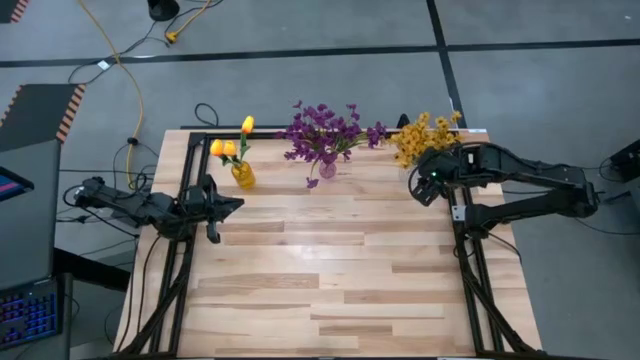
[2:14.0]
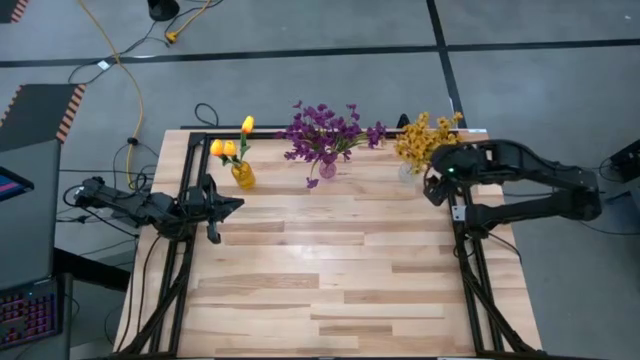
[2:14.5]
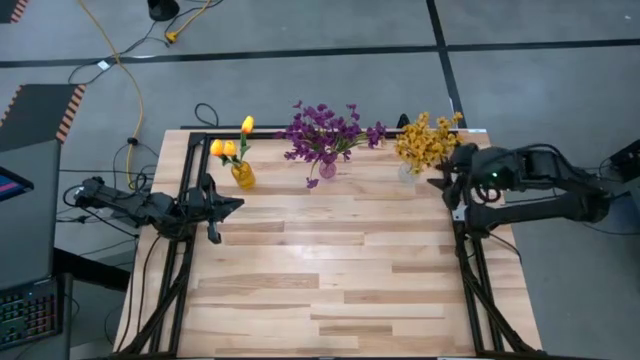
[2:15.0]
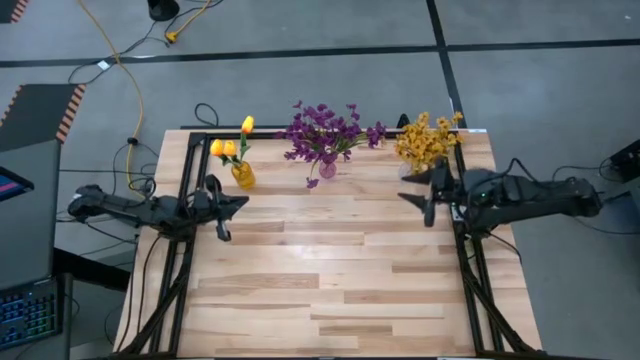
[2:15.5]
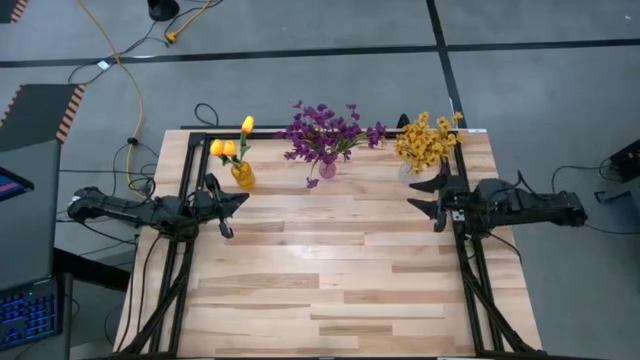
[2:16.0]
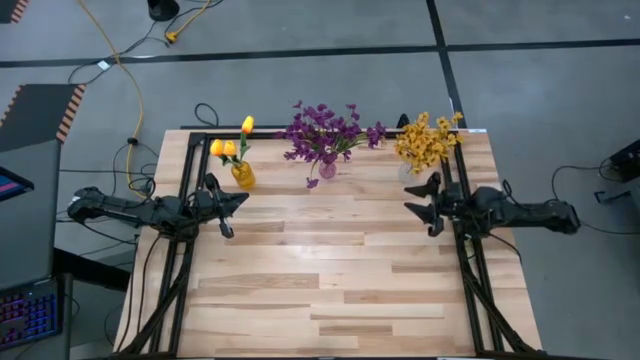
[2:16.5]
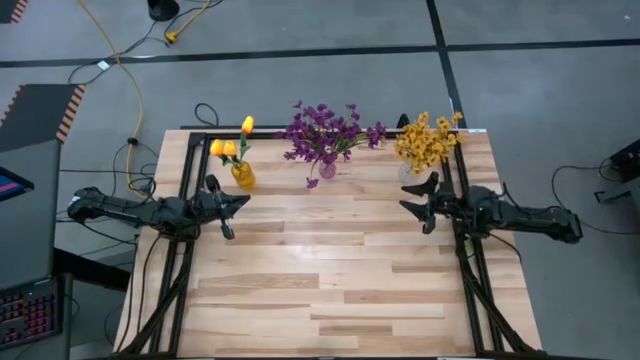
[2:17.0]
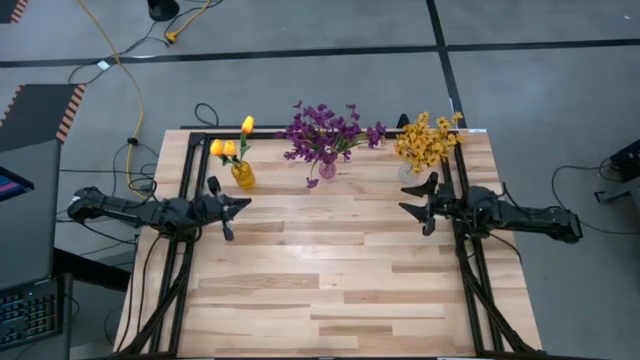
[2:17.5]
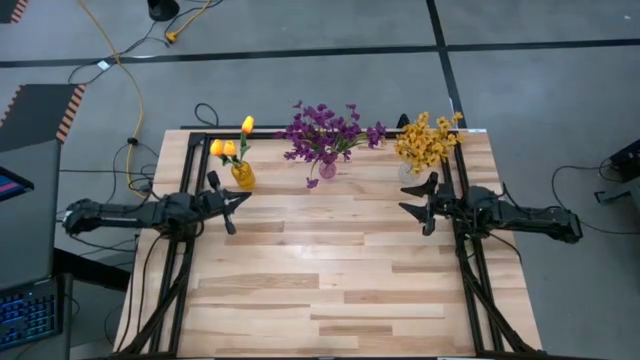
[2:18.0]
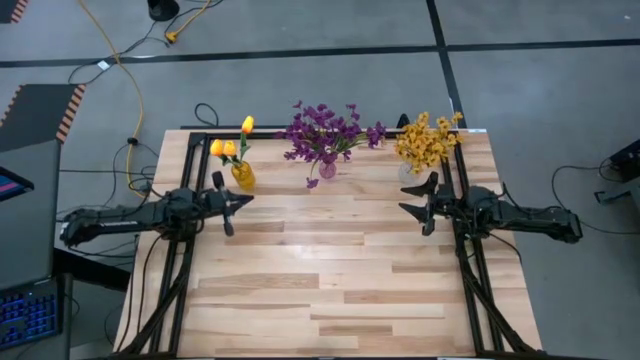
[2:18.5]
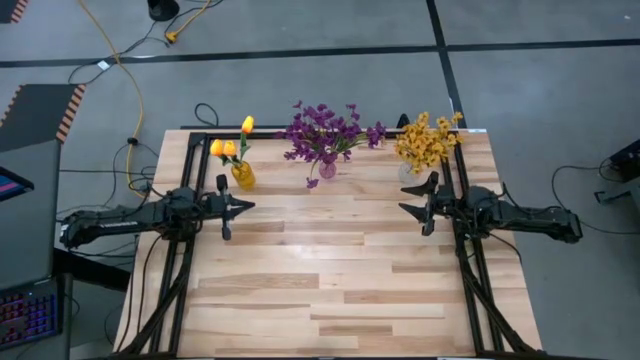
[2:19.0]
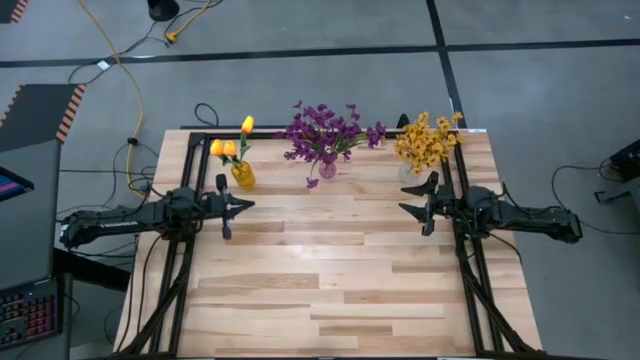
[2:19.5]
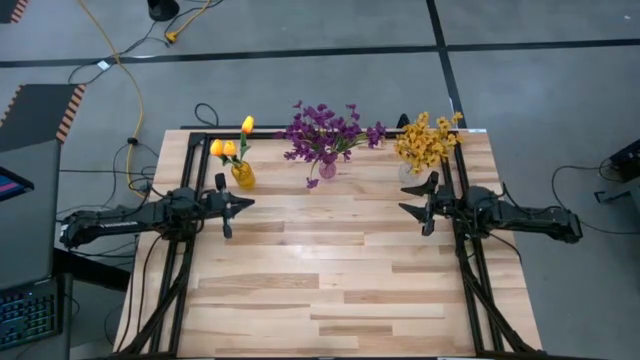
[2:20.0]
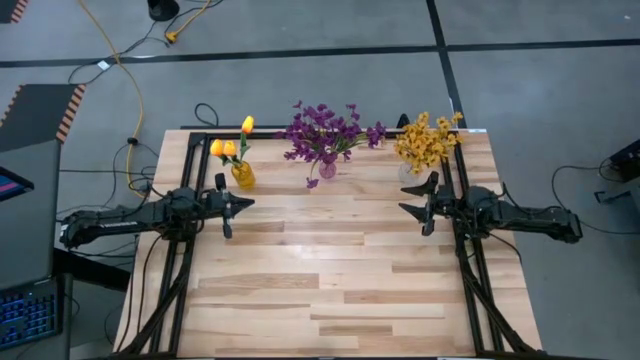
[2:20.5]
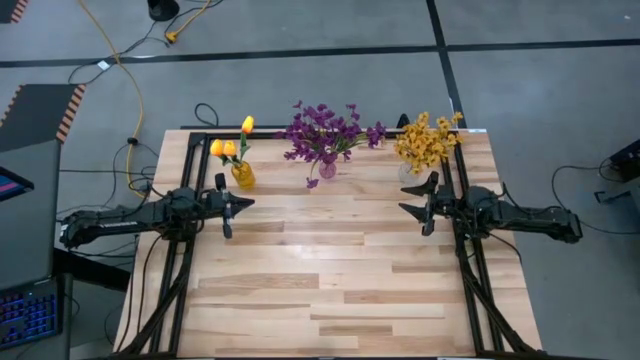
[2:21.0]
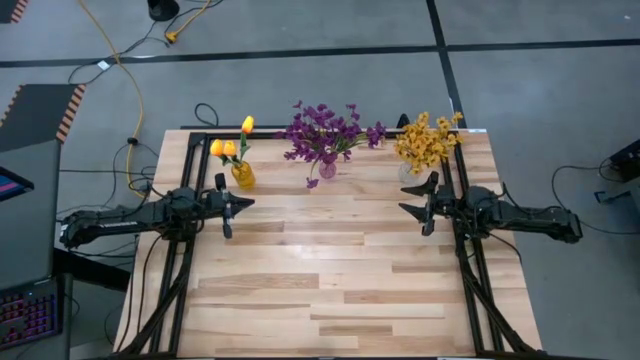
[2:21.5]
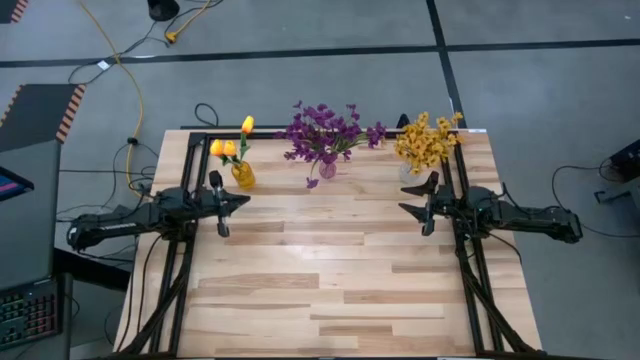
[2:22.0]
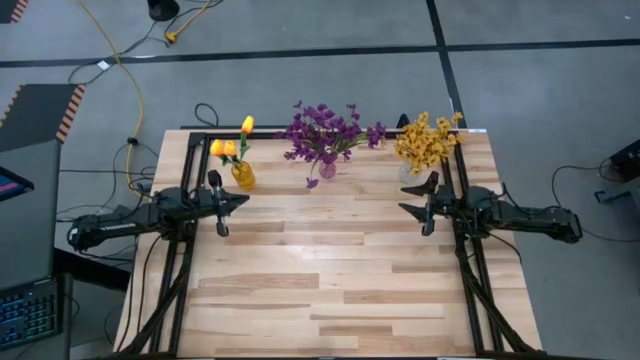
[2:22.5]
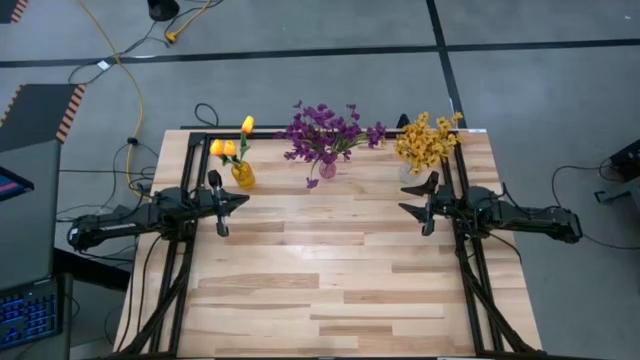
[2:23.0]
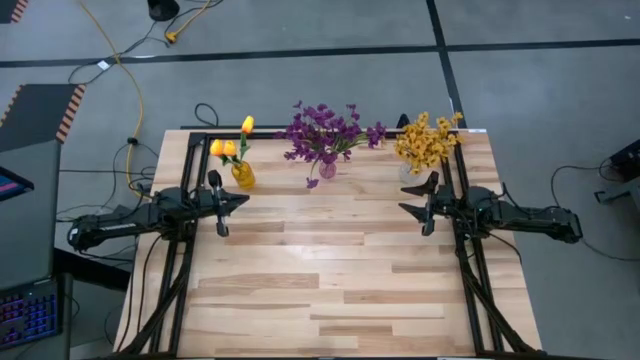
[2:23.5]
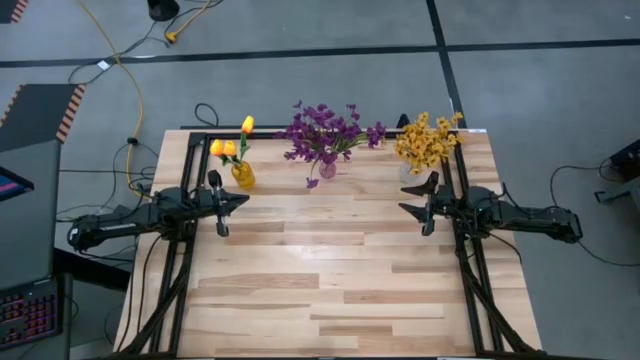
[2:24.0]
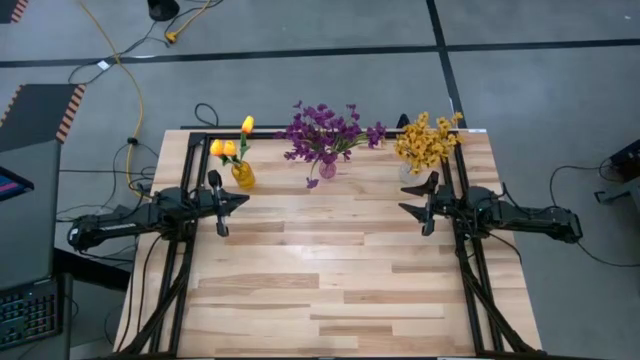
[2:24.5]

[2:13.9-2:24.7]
Task: Sort flowers into vase by color
Return to Home Position

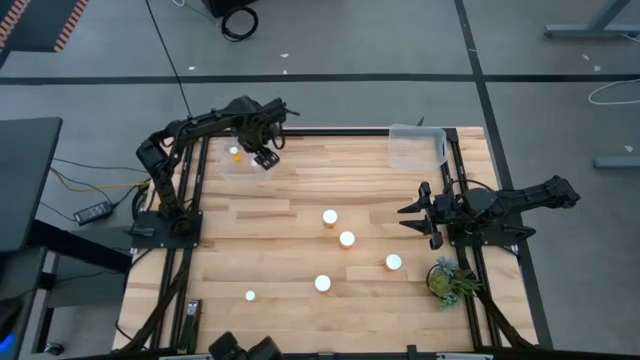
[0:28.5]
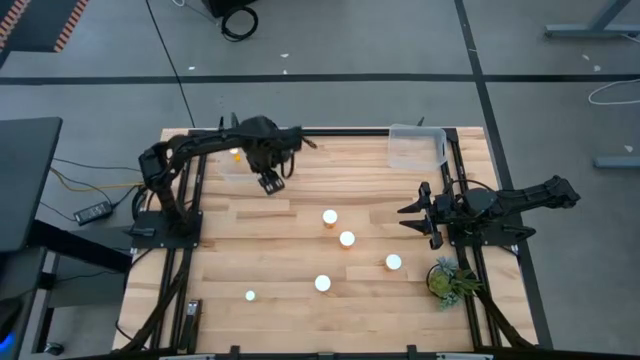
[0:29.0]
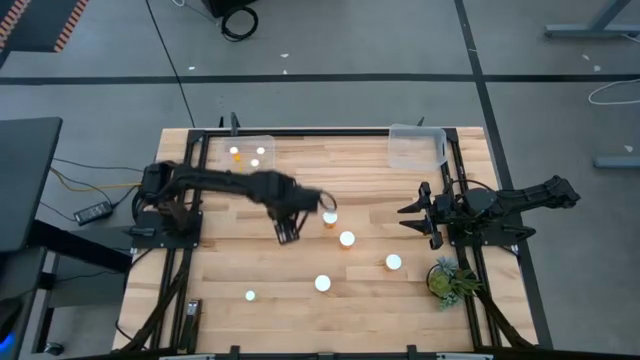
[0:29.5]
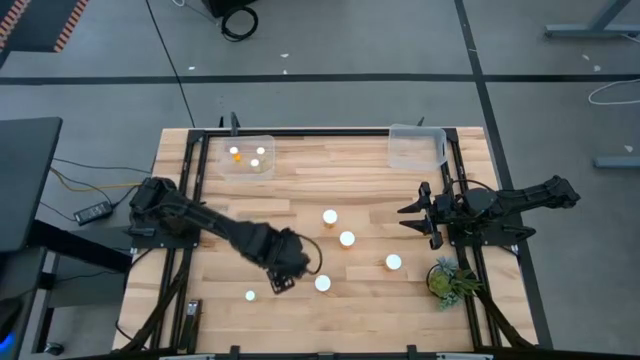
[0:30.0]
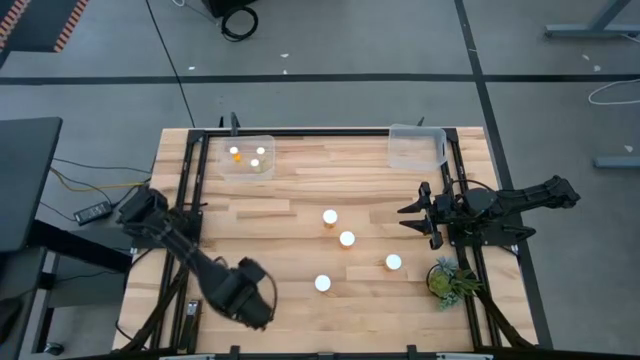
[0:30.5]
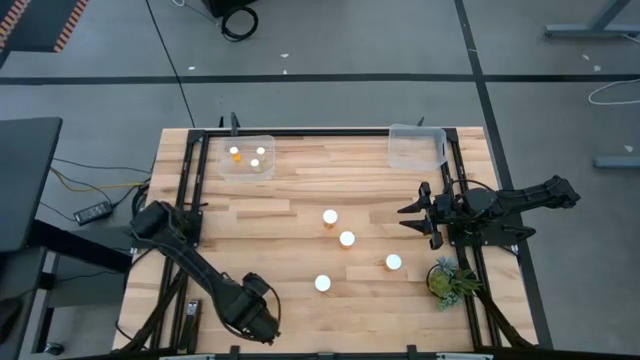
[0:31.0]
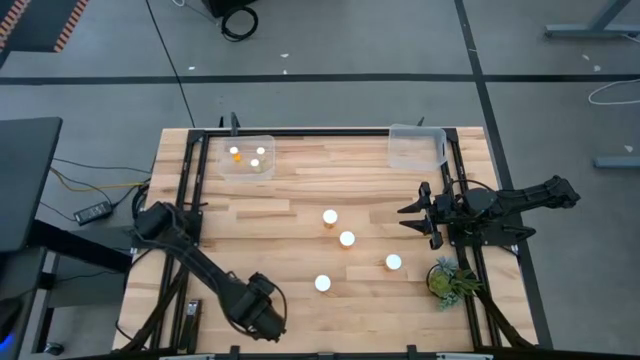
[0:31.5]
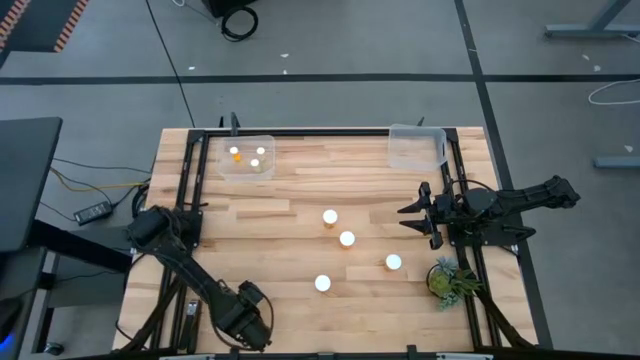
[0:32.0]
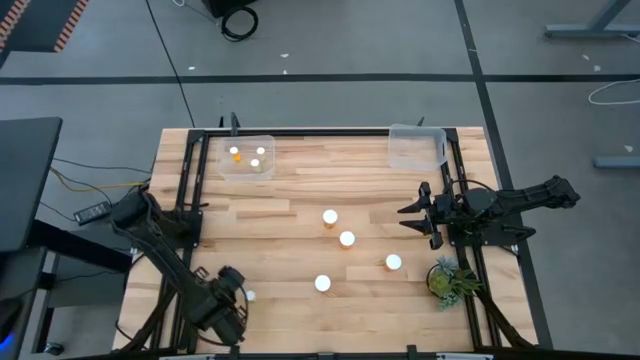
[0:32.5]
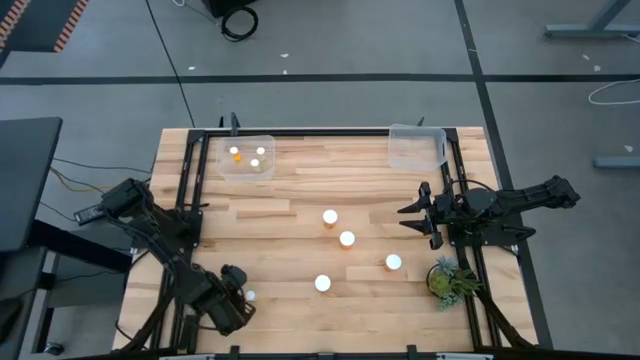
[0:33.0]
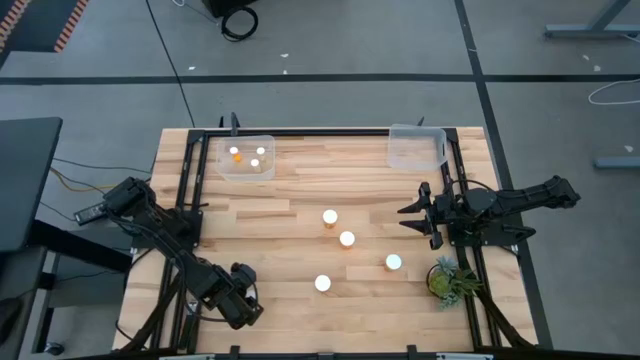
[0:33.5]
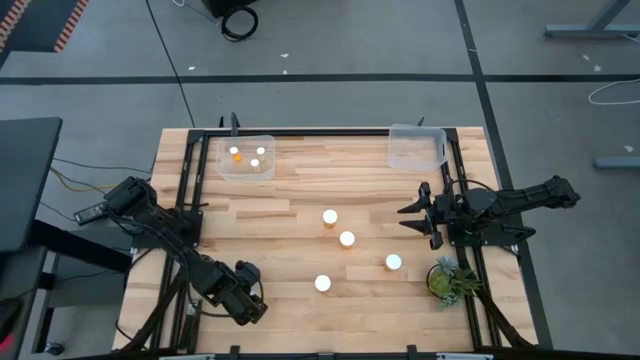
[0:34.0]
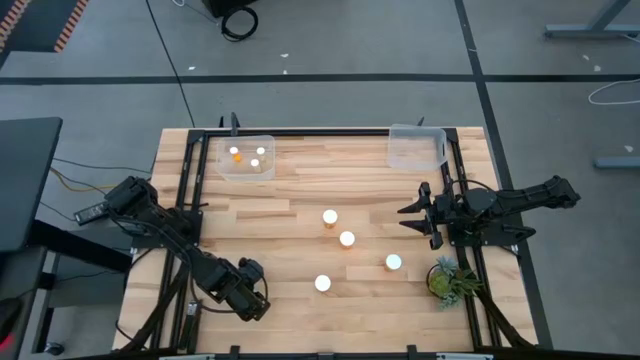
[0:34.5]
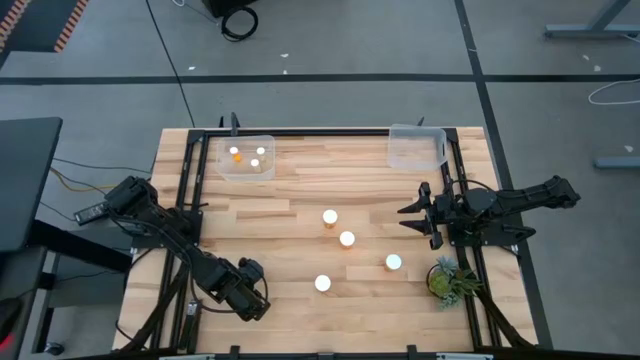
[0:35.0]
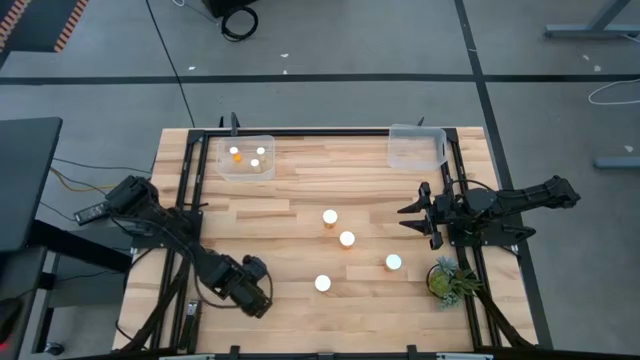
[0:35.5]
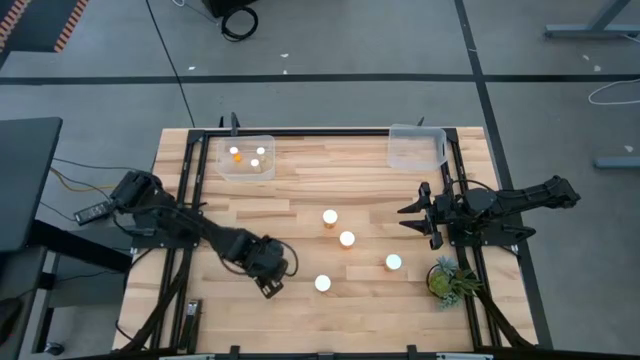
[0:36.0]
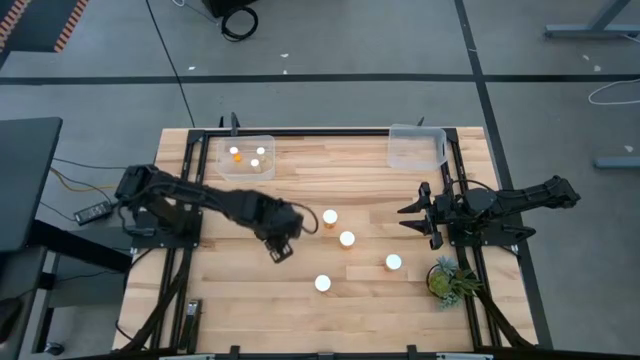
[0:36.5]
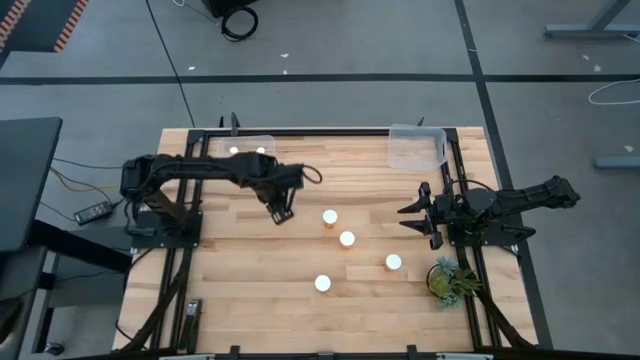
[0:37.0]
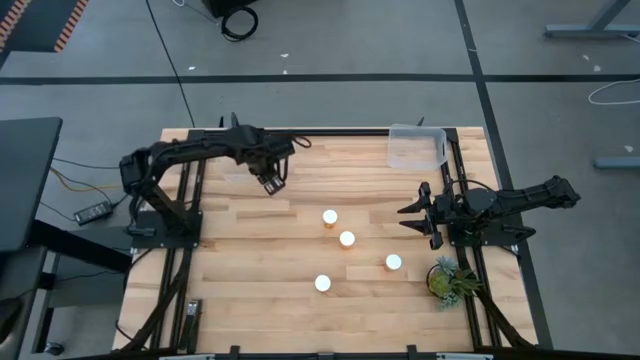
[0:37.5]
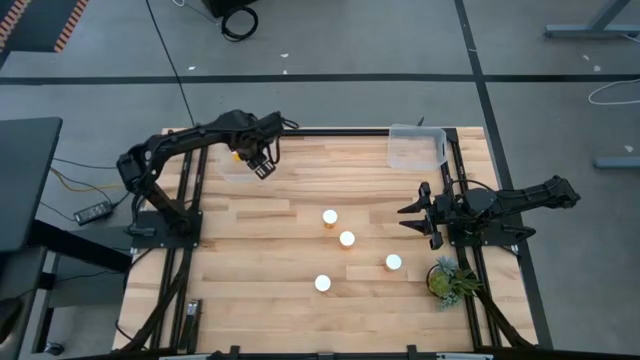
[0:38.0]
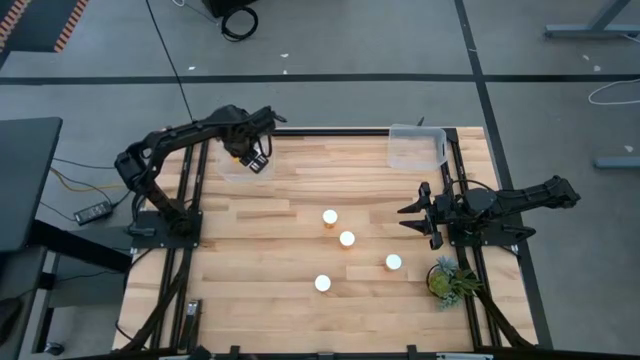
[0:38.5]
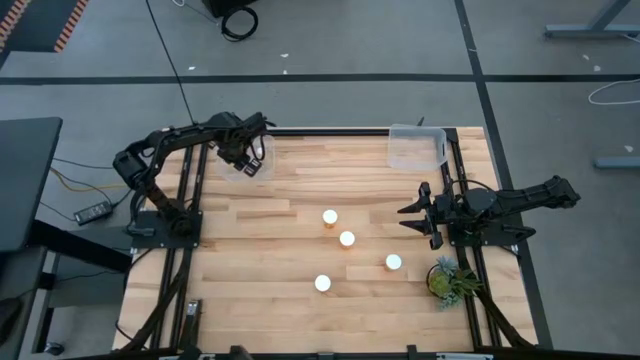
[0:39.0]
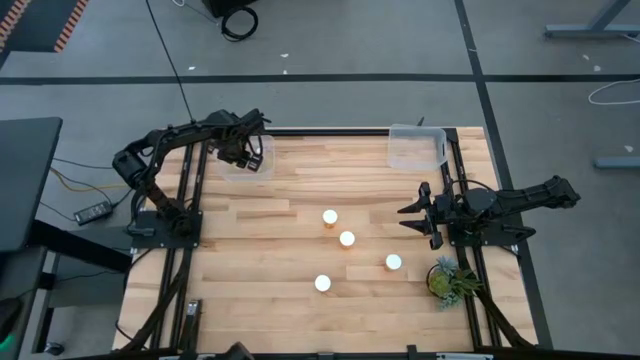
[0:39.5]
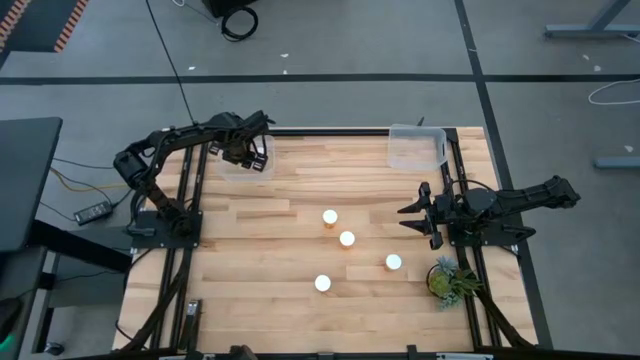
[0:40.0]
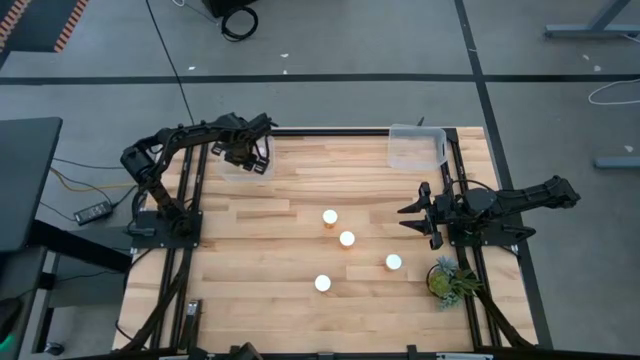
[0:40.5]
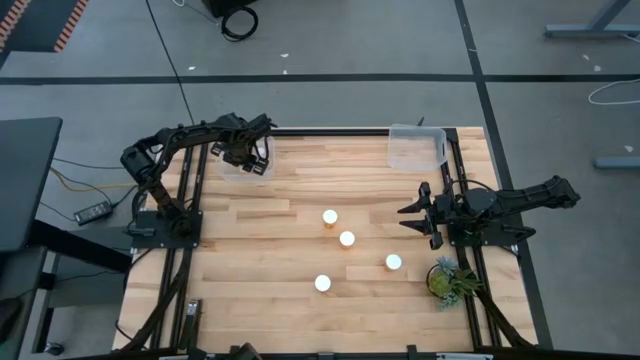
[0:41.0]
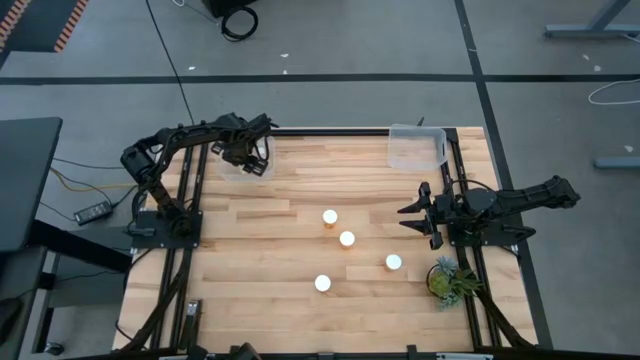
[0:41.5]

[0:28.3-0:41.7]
Task: Pick and place medicine bottles into bin by pill shape (circle, oval)
Put the yellow tablet bottle into the left transparent bin
